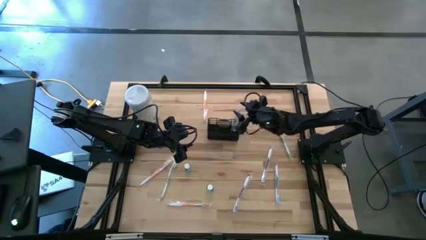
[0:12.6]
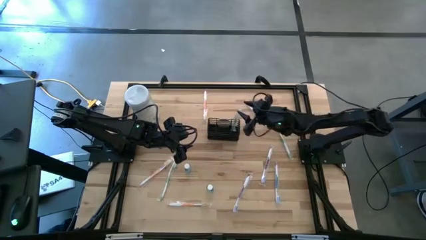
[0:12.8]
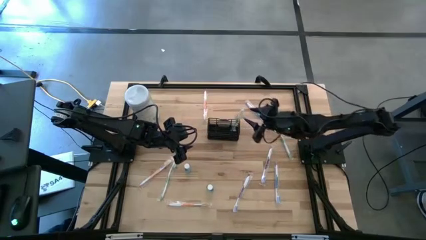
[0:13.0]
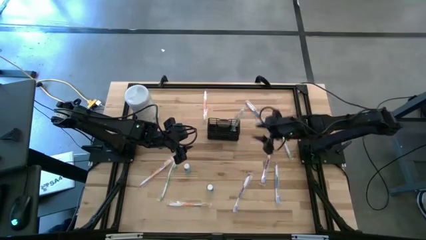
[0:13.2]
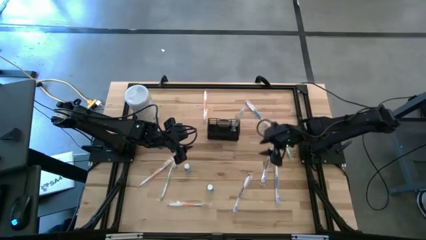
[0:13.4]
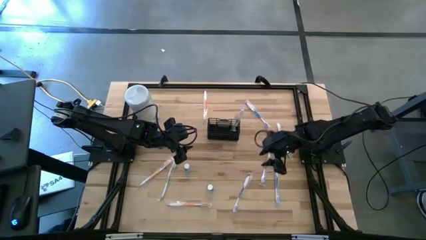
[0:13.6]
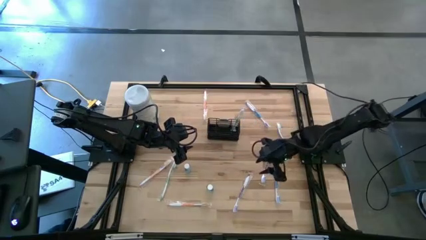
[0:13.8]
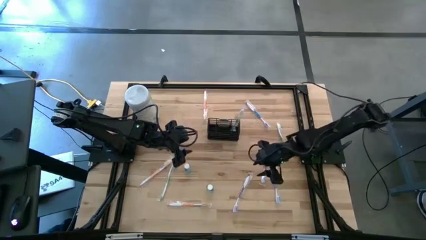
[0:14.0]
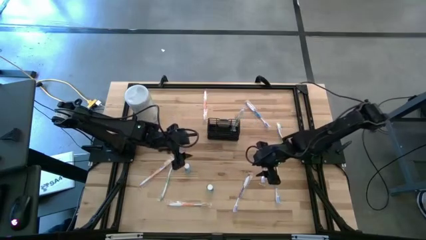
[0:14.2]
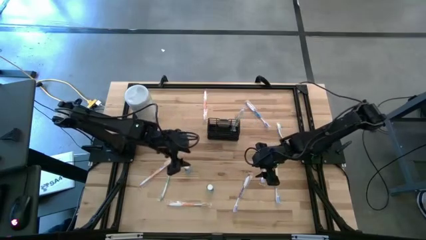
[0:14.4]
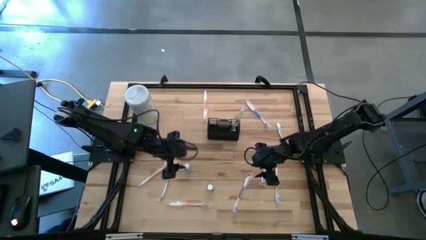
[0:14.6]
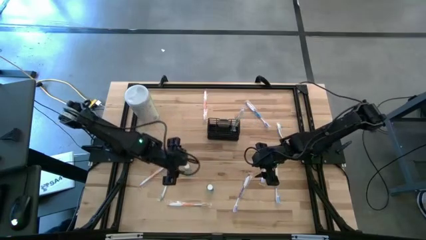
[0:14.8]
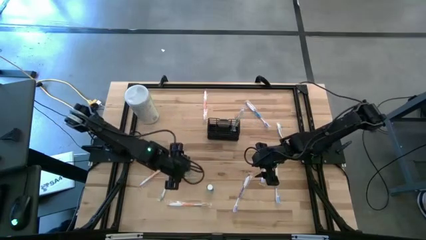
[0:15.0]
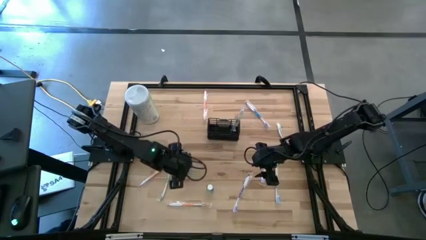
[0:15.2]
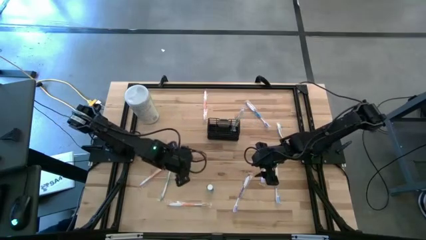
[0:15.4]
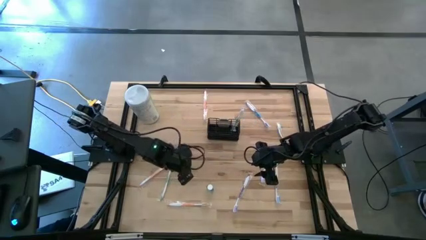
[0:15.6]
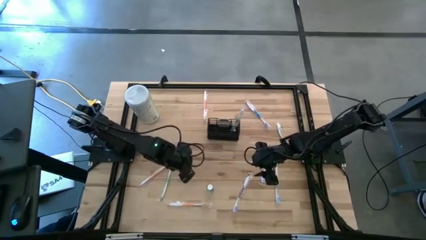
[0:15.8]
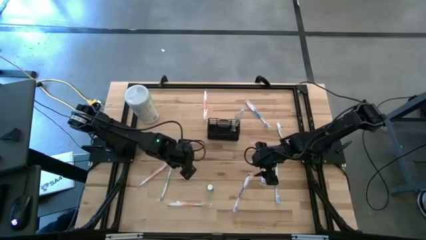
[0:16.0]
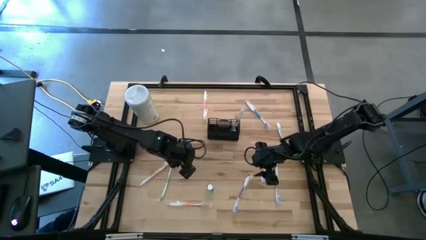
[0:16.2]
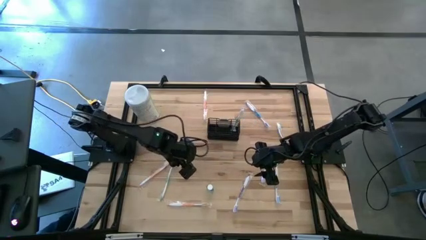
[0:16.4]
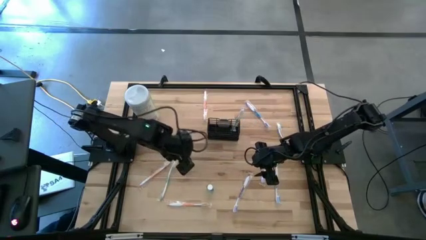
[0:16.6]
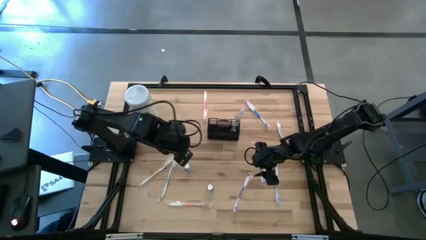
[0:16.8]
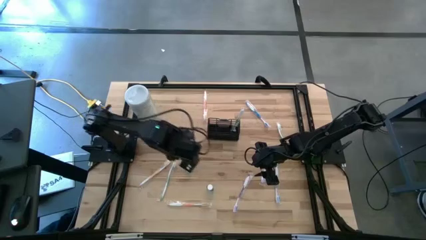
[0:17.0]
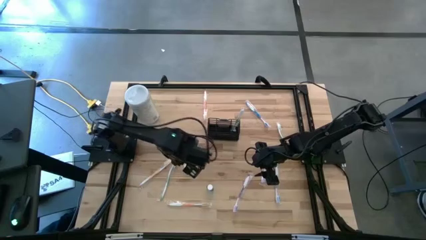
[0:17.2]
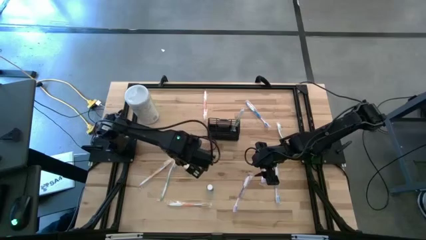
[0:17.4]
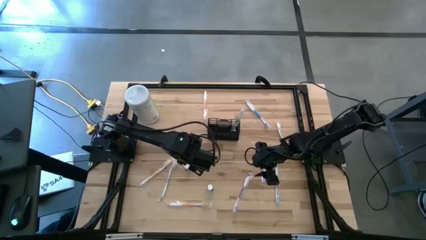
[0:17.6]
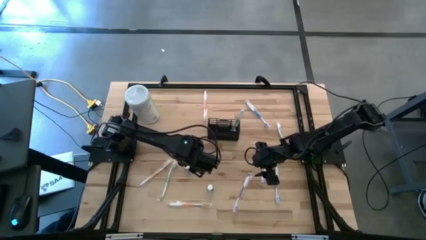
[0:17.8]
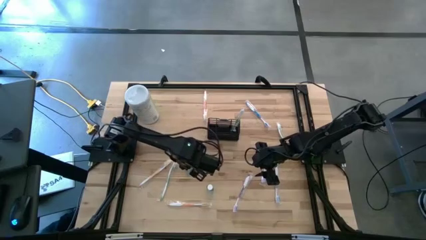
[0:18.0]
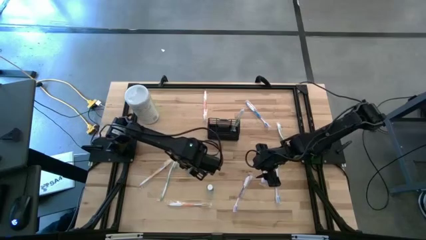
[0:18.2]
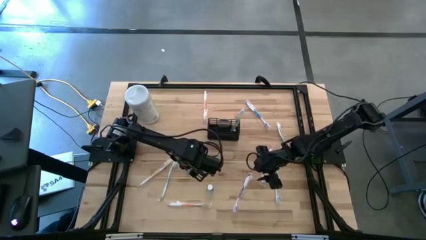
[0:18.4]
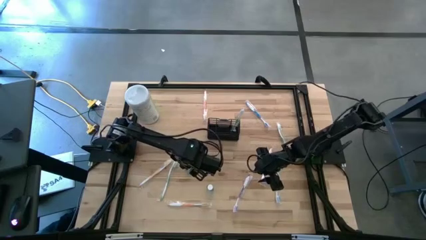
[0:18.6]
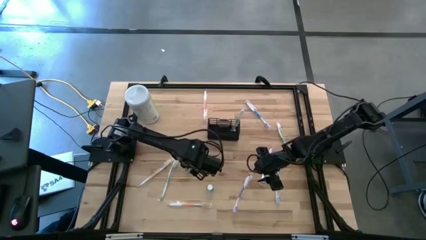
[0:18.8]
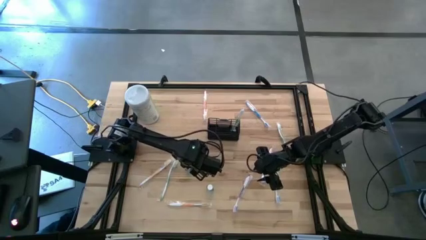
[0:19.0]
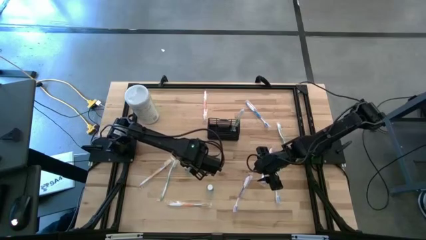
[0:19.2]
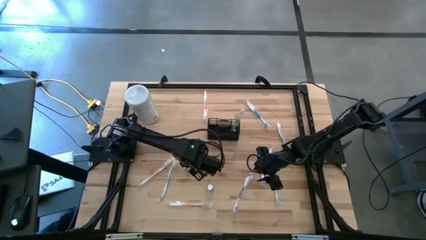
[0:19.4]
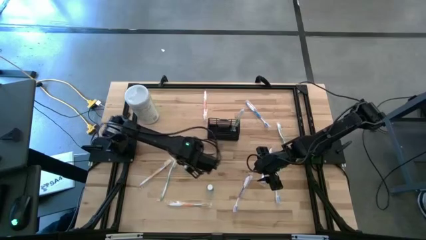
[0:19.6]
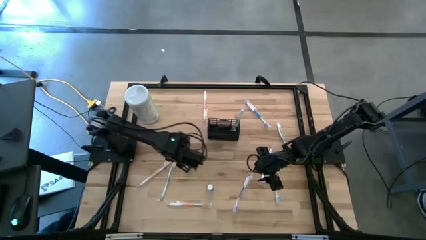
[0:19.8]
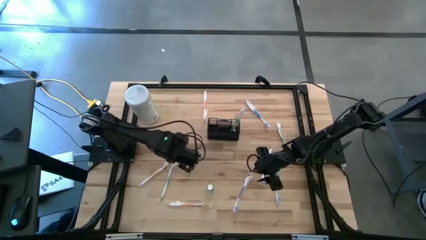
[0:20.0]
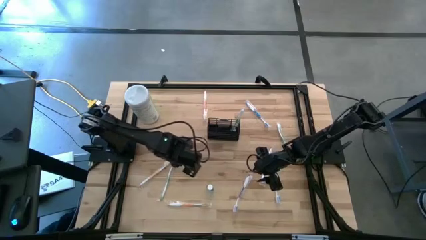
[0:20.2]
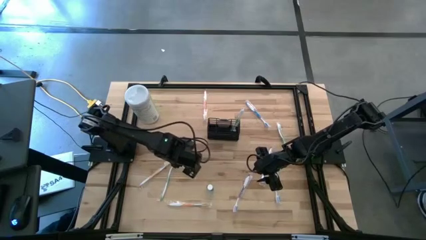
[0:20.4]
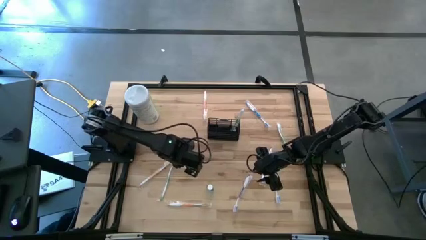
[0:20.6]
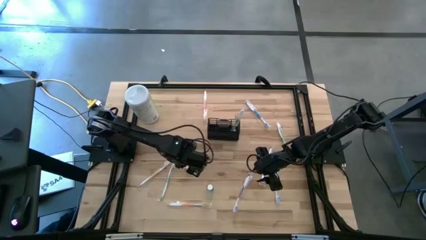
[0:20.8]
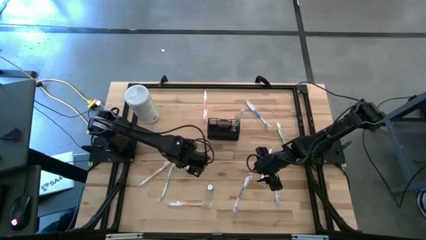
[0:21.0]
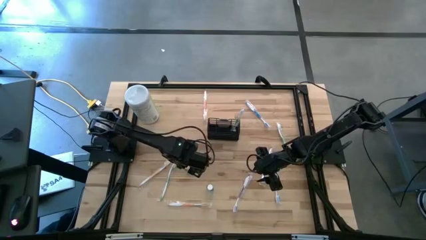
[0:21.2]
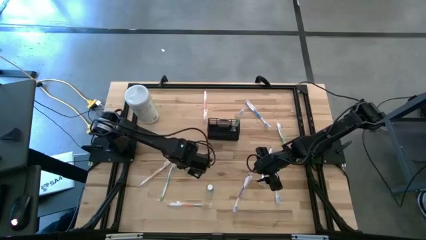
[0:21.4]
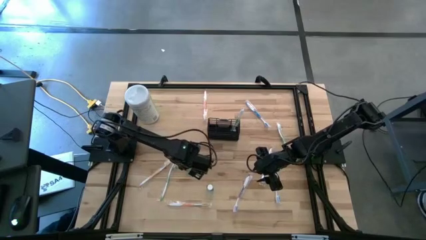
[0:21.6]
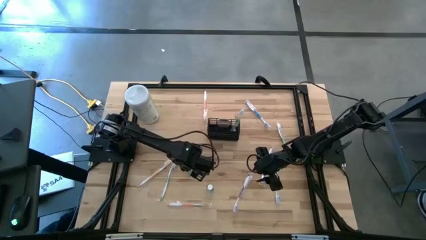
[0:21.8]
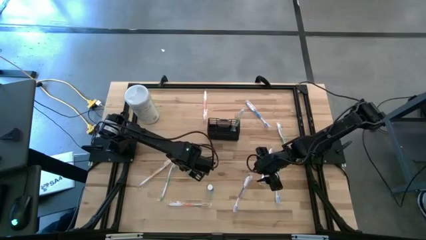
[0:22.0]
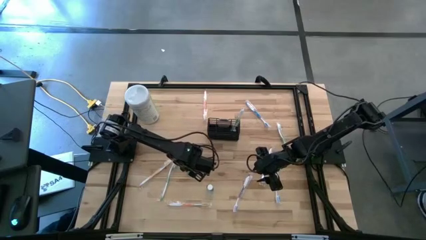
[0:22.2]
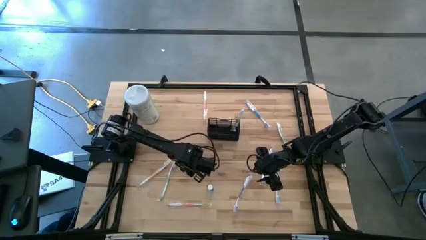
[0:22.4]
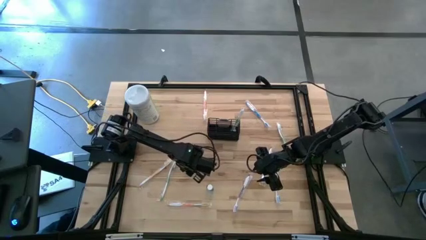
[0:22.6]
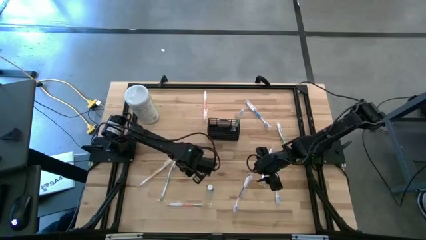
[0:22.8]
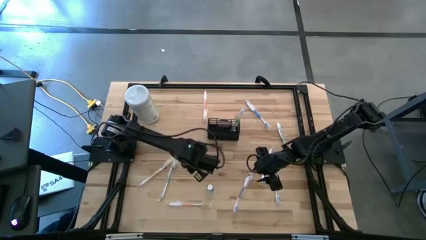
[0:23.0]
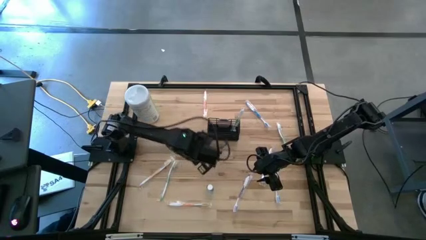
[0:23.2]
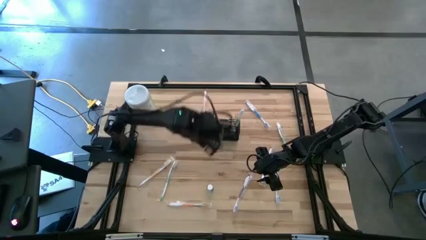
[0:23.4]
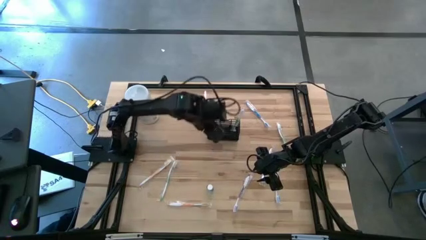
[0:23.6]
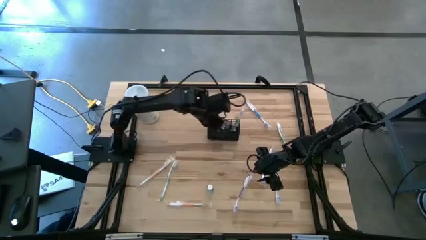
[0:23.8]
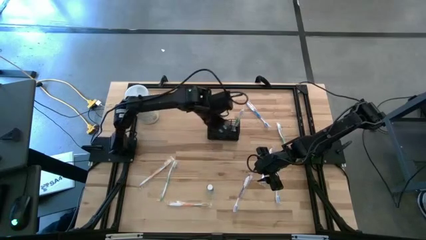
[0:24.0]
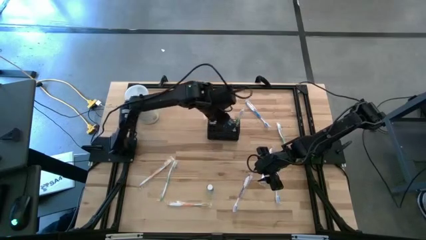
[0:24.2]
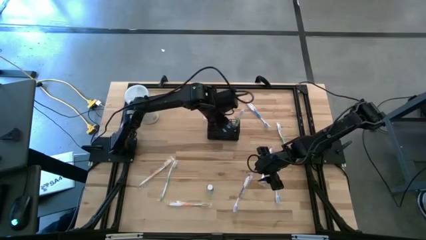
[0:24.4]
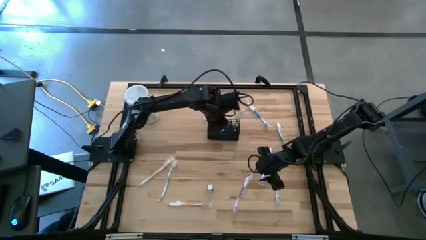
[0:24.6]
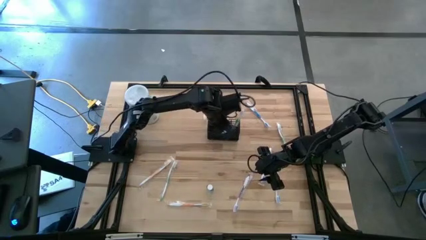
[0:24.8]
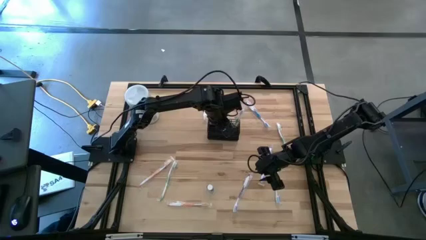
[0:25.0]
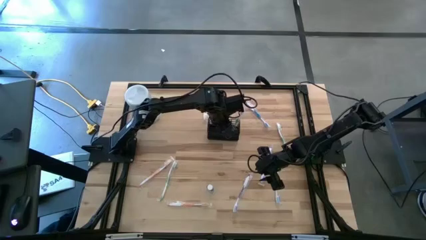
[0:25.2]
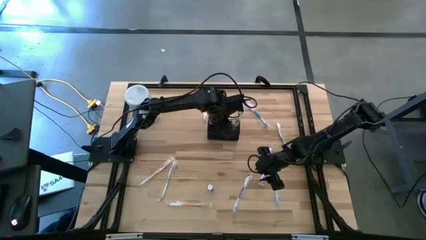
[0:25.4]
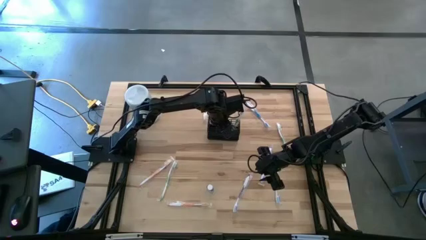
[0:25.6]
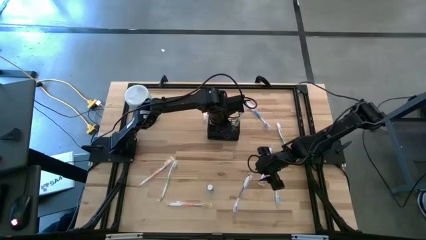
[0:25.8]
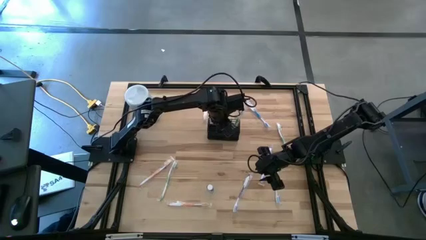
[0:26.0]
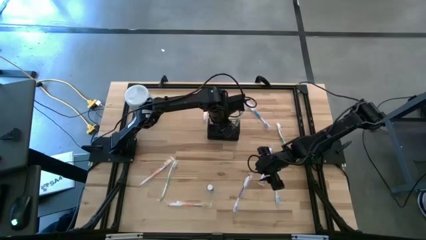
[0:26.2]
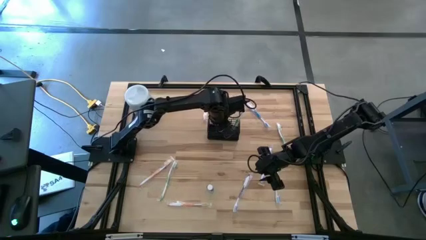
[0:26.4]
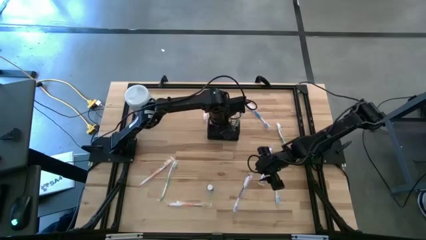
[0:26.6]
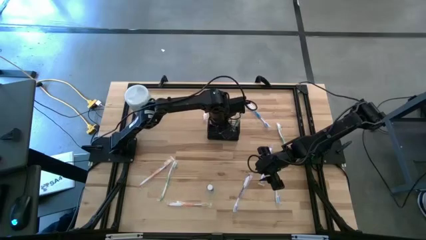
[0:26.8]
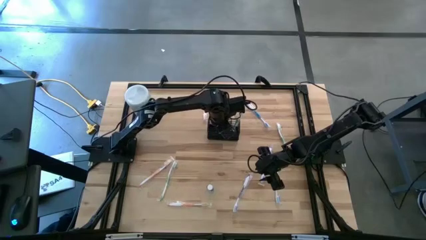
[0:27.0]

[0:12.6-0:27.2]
Task: Pick & Place toothbrushing station
Put the top mouthwash into the mesh organizer
